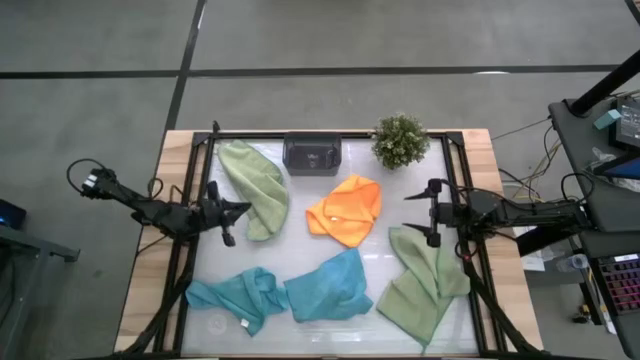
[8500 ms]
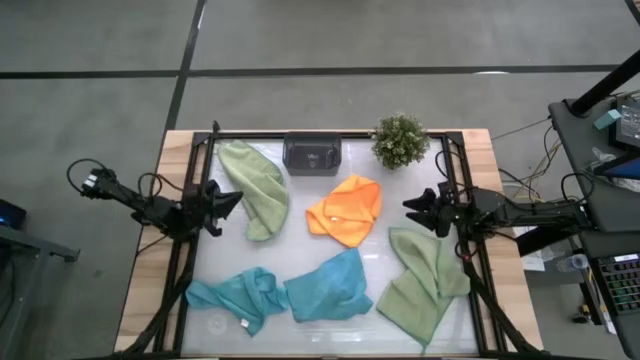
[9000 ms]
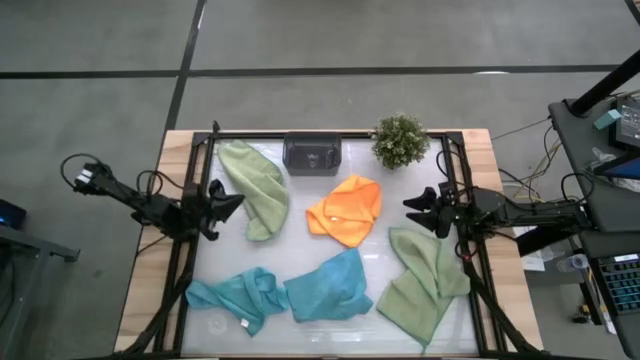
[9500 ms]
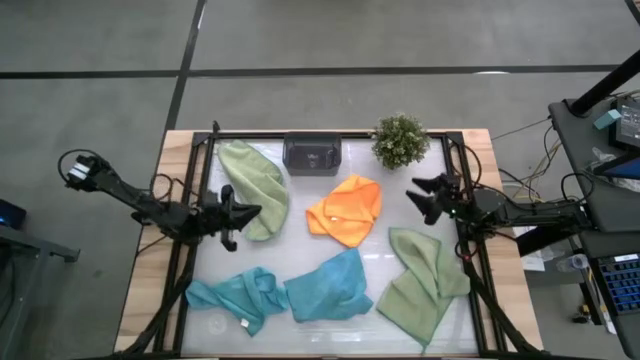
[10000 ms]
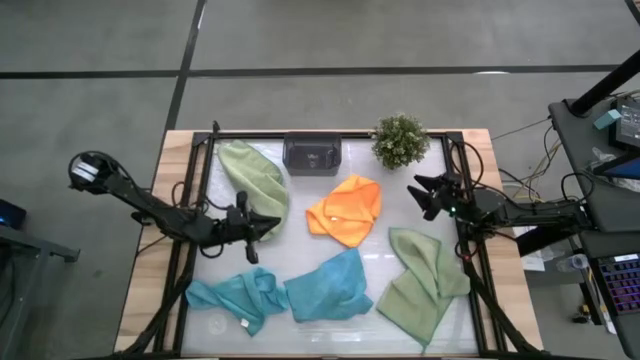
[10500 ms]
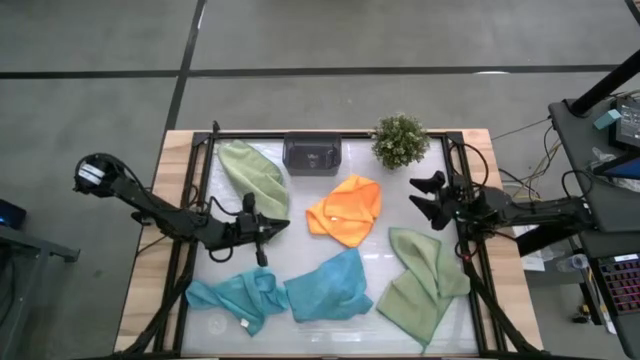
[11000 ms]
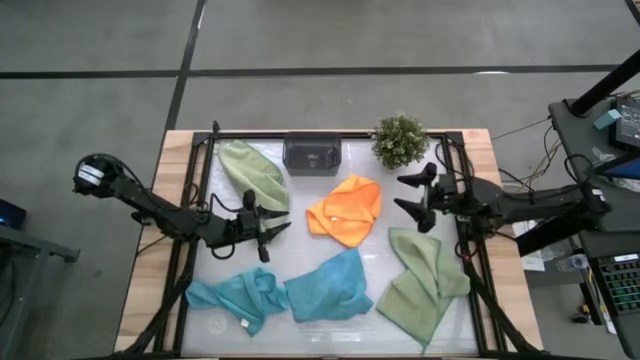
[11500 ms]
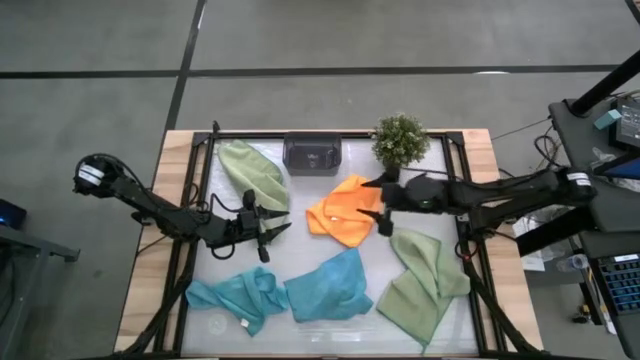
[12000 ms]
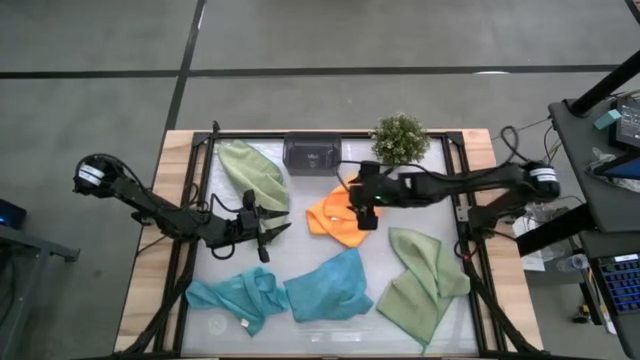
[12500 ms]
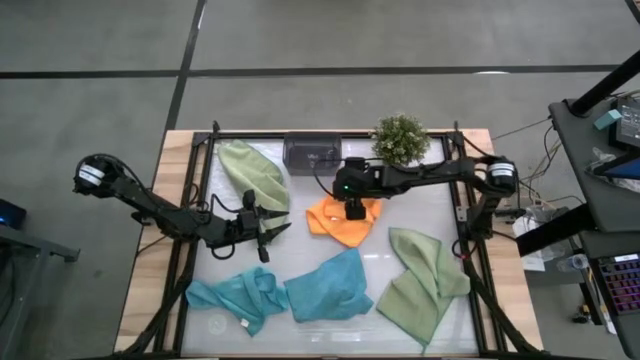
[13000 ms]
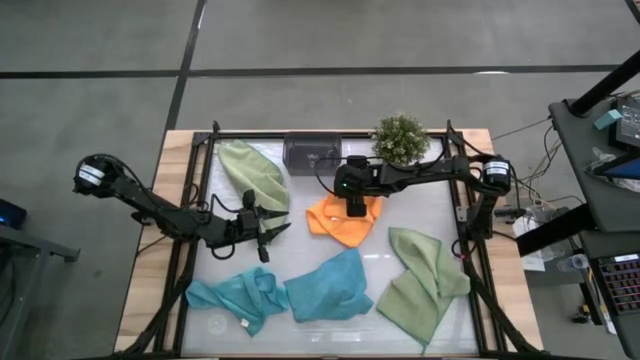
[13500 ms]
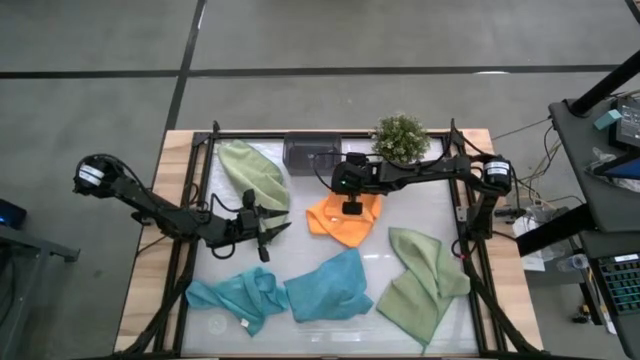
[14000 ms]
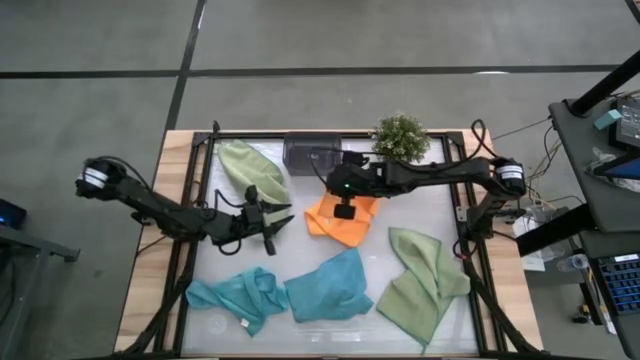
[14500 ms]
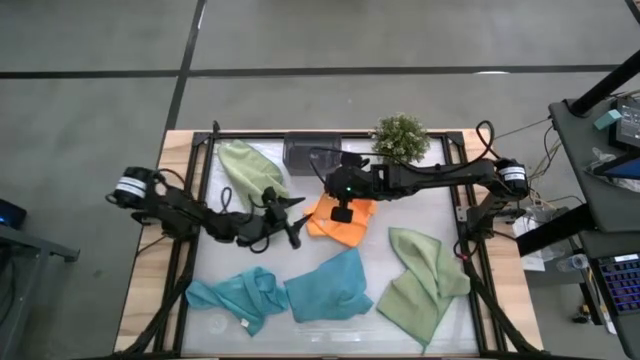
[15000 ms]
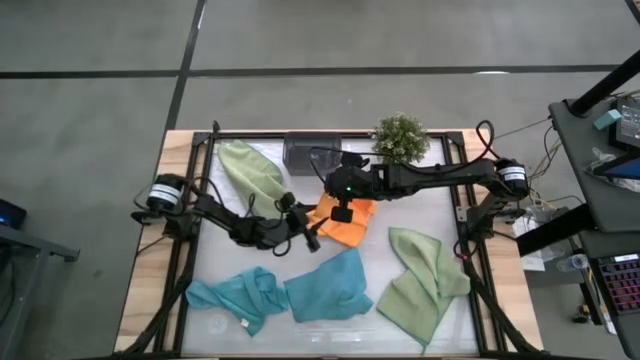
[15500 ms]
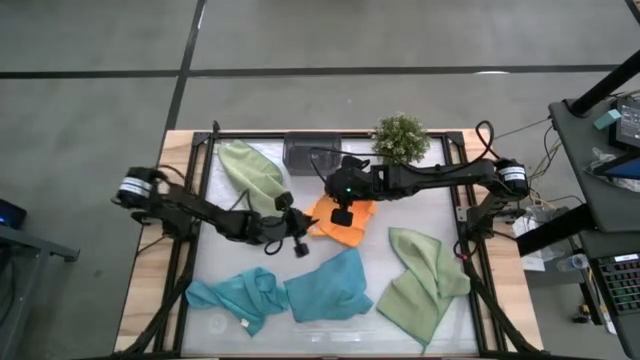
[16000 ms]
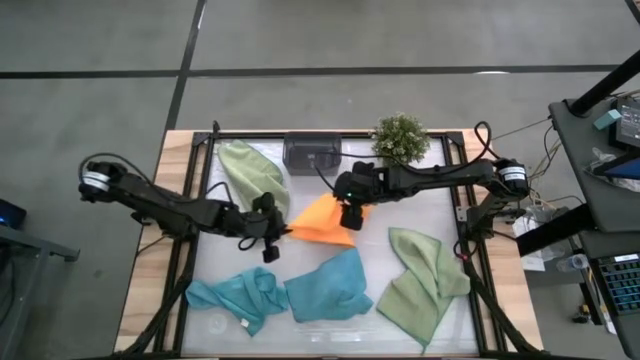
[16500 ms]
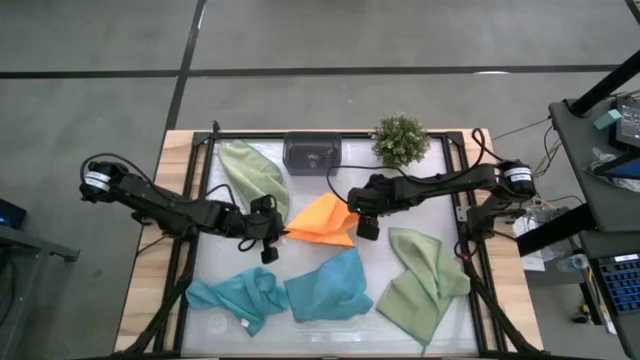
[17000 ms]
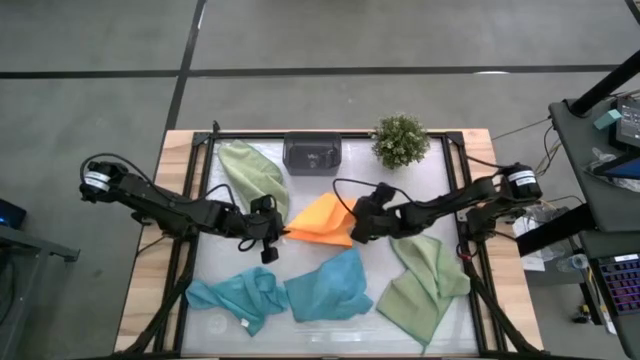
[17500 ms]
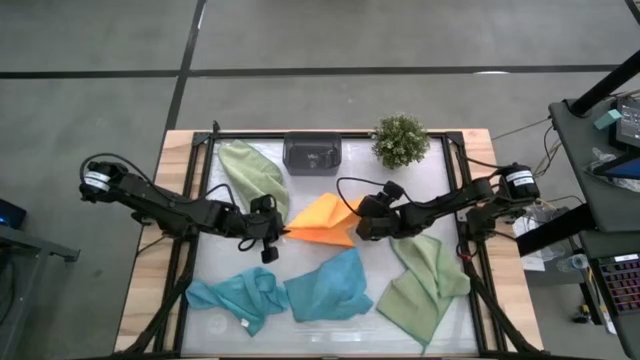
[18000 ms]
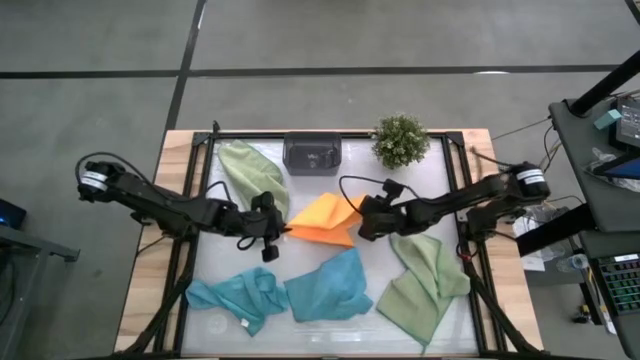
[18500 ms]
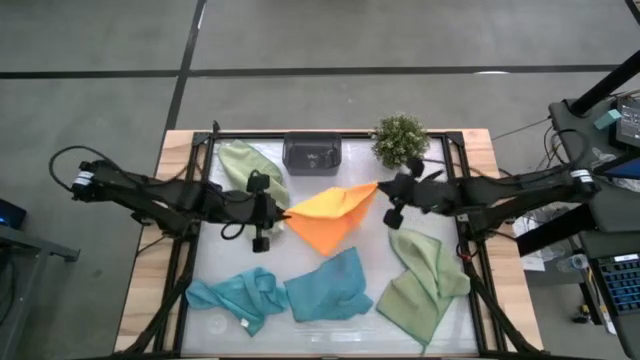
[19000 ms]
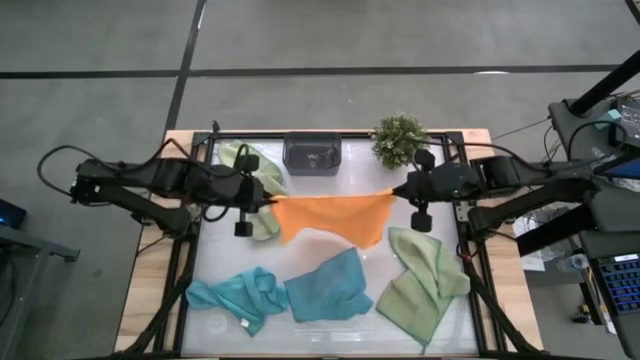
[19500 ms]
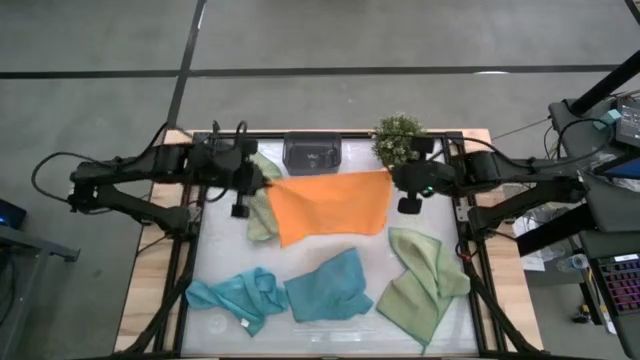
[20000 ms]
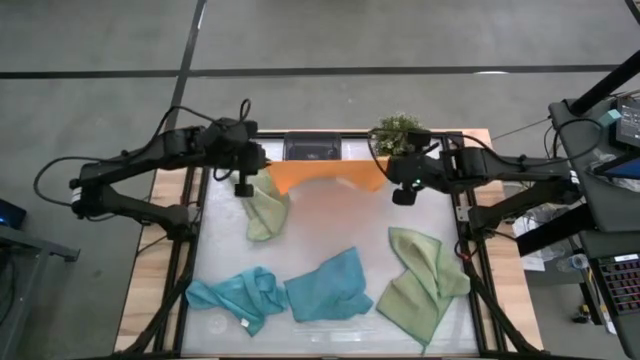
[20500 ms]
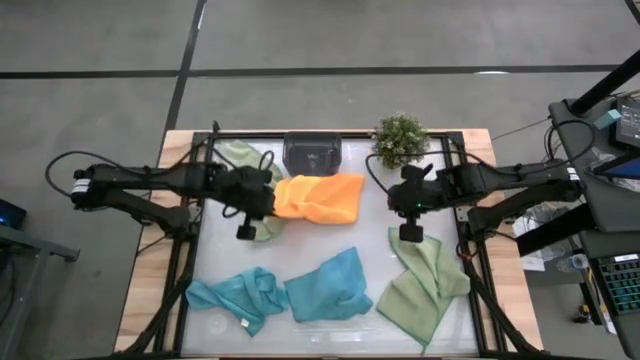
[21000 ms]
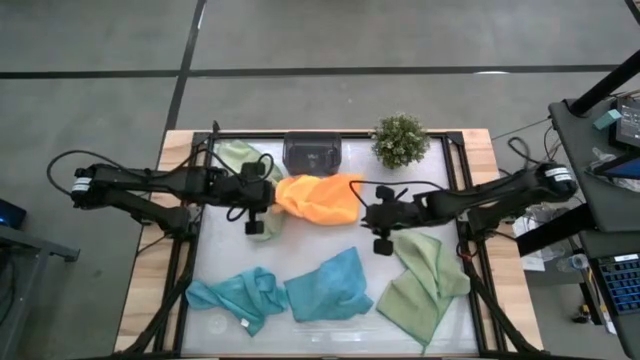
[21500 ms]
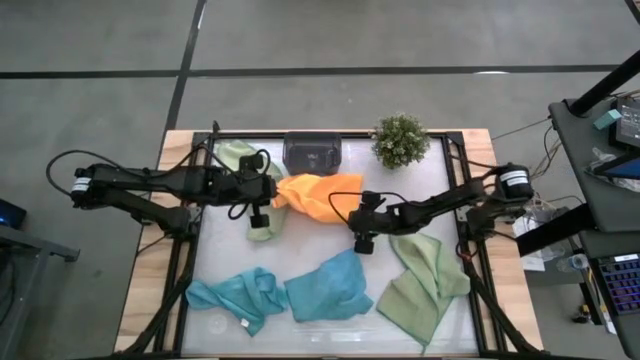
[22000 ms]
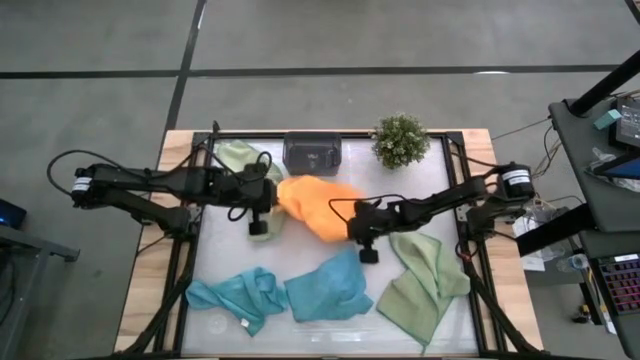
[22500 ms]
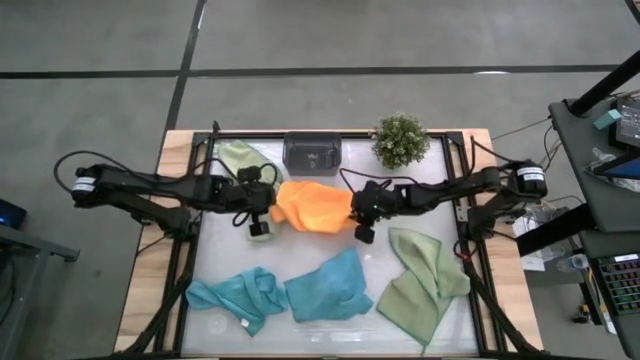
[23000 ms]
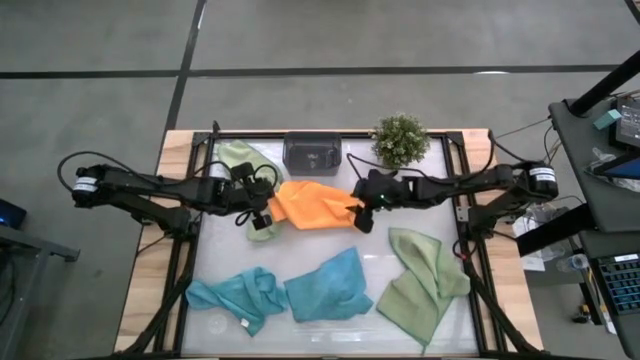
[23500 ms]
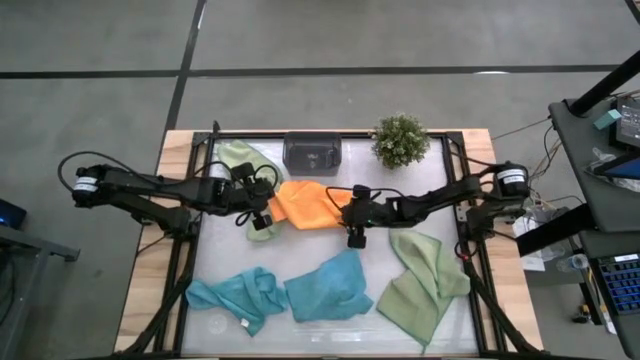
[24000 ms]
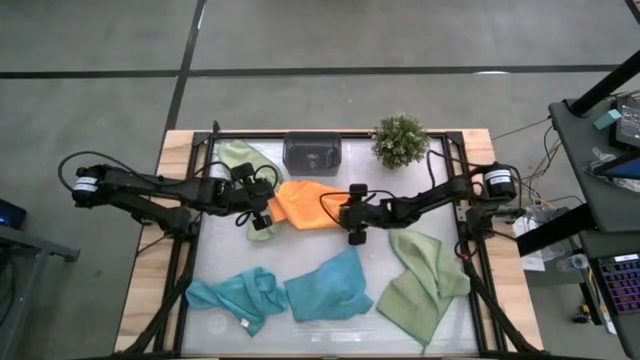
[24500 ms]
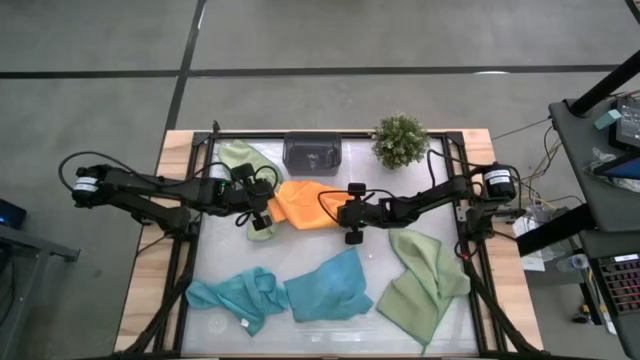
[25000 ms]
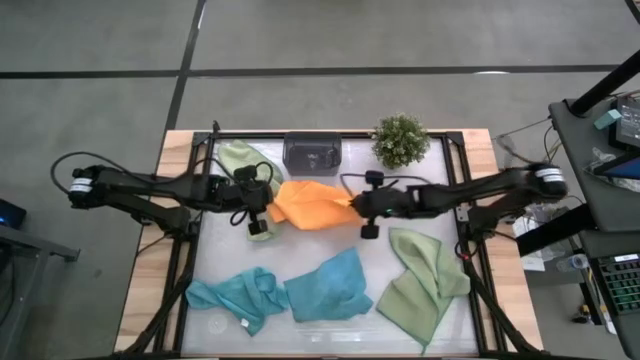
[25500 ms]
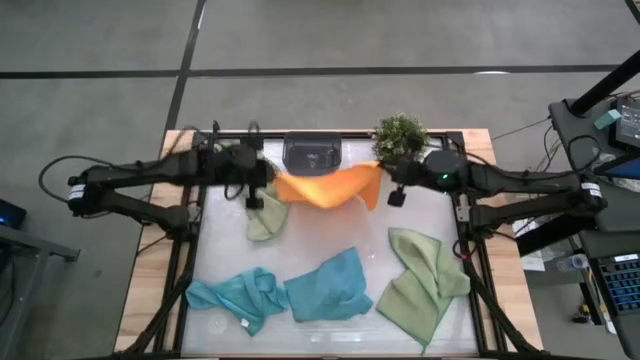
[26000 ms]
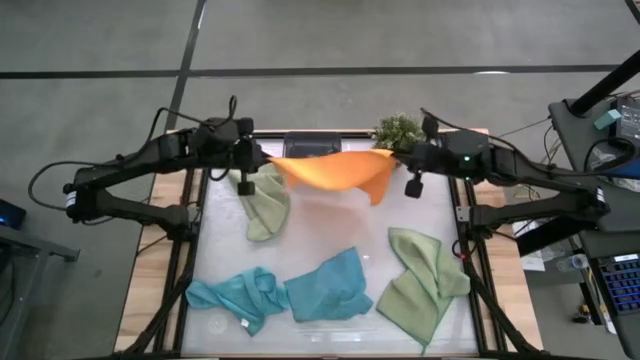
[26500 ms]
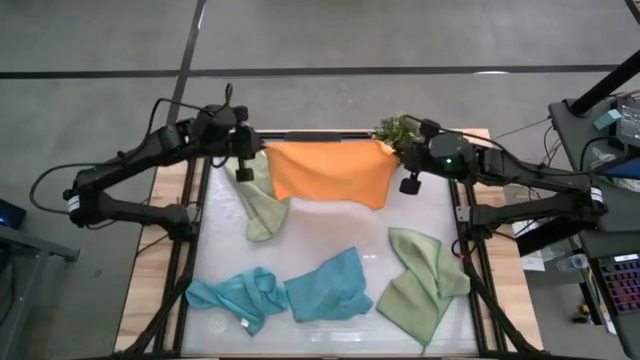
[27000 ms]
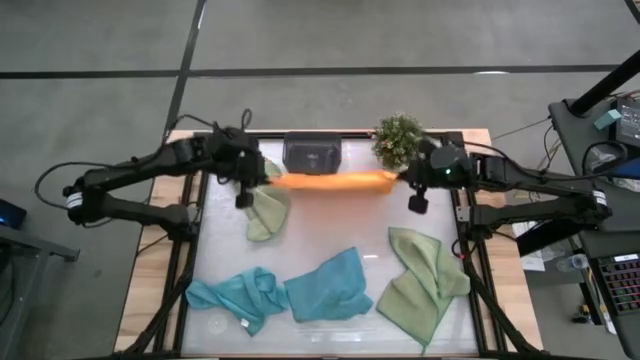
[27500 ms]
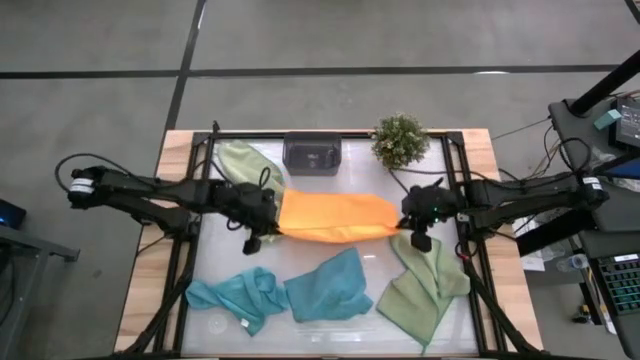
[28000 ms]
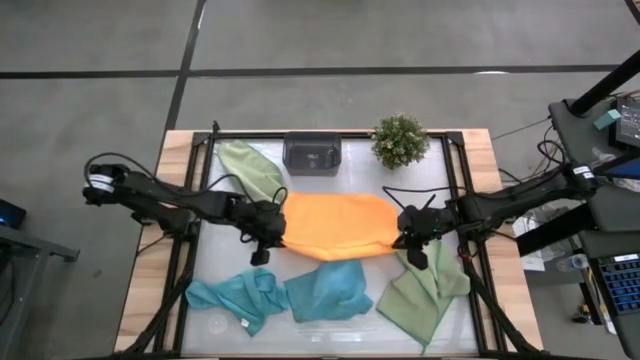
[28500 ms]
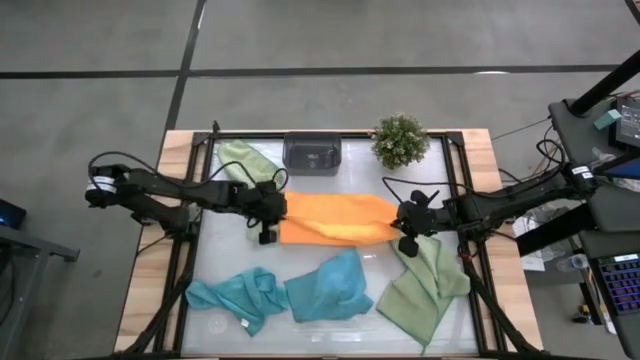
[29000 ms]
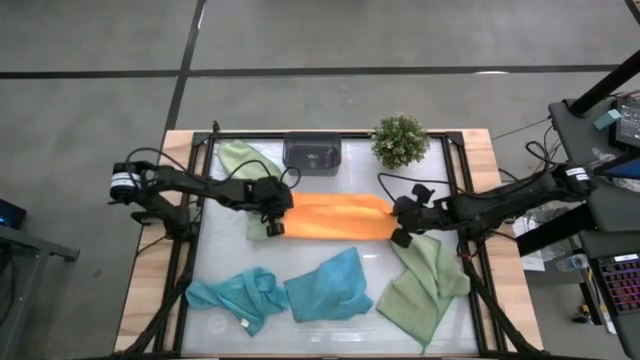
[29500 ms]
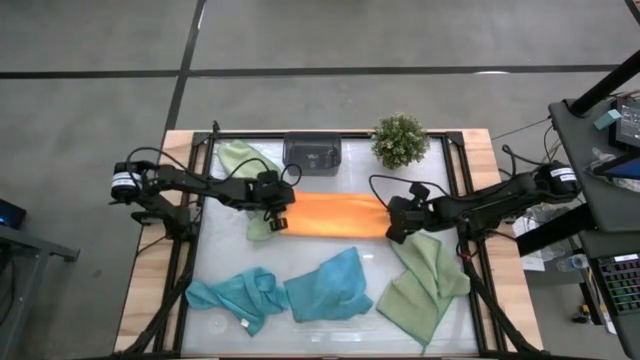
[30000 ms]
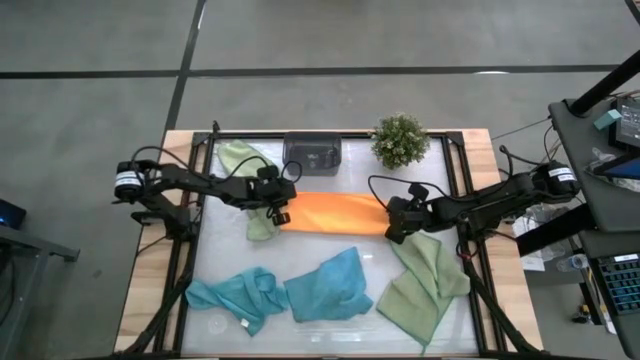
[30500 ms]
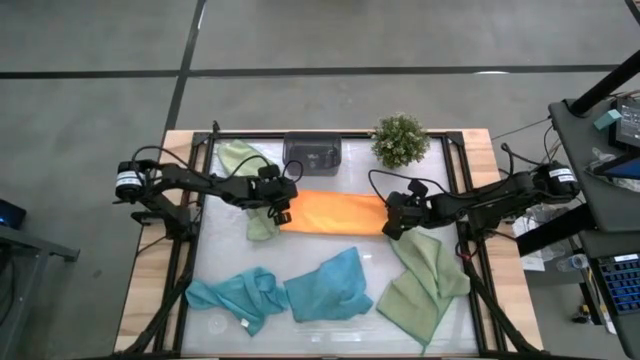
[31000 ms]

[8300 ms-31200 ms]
Task: Fold microfiber towels
Fold the orange microfiber towel
